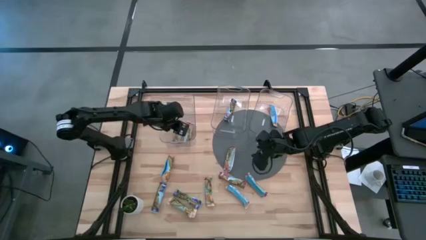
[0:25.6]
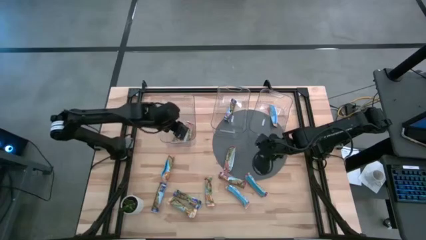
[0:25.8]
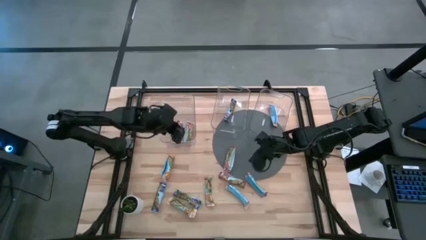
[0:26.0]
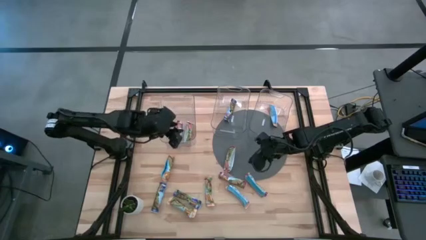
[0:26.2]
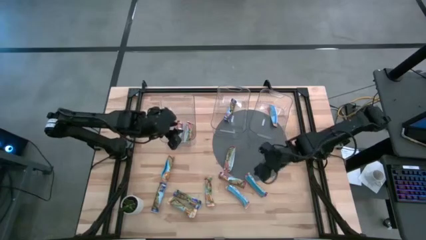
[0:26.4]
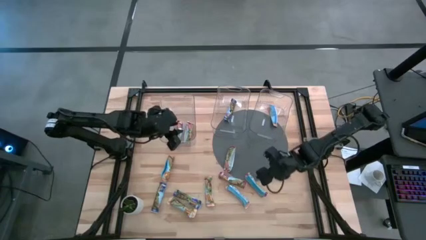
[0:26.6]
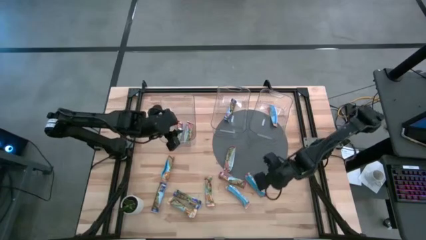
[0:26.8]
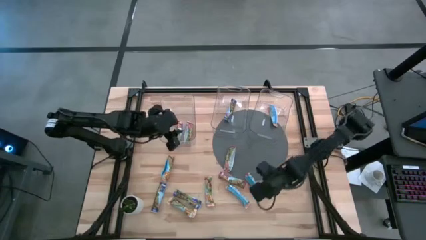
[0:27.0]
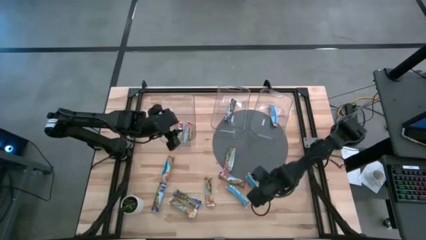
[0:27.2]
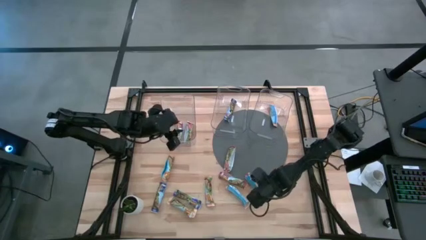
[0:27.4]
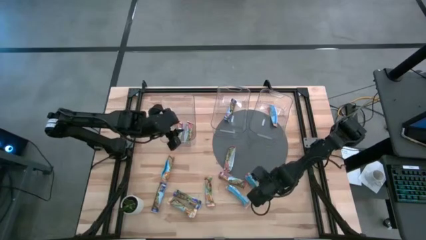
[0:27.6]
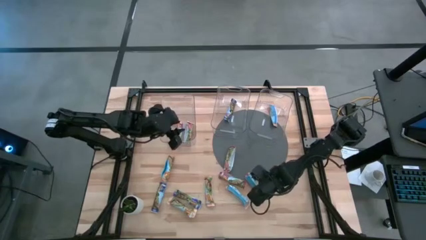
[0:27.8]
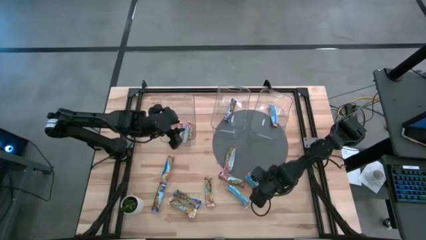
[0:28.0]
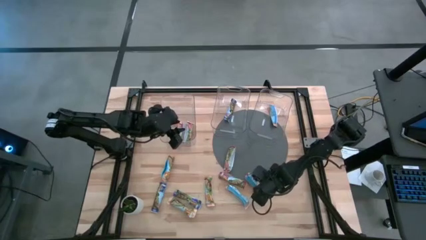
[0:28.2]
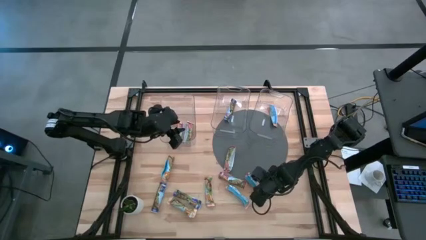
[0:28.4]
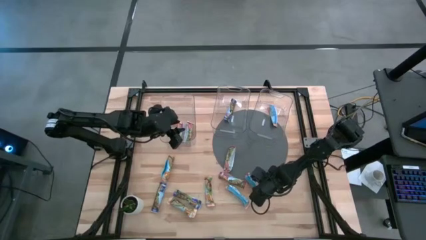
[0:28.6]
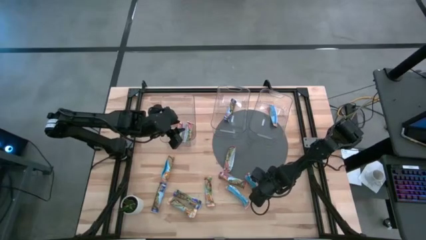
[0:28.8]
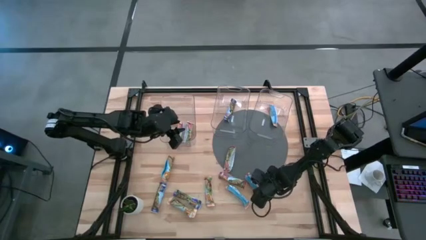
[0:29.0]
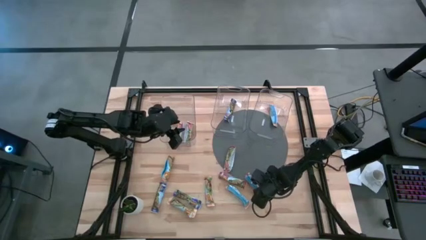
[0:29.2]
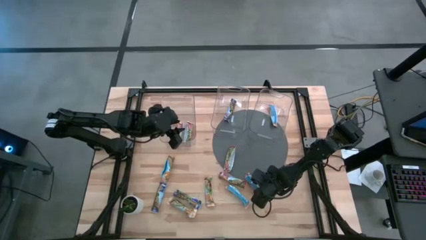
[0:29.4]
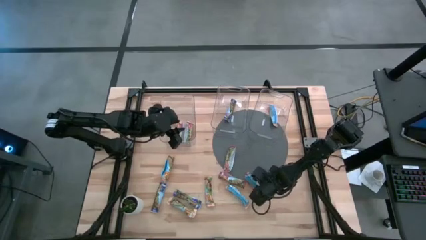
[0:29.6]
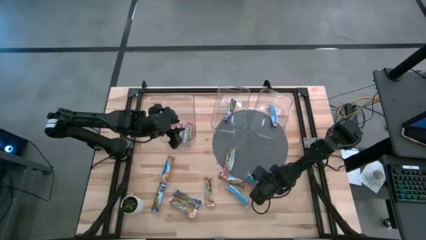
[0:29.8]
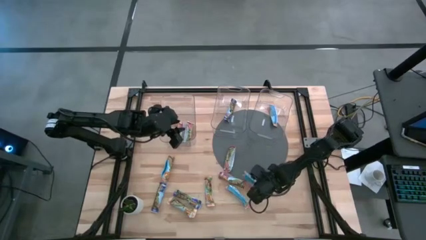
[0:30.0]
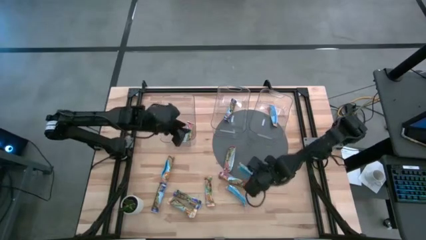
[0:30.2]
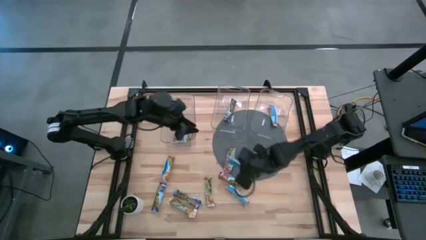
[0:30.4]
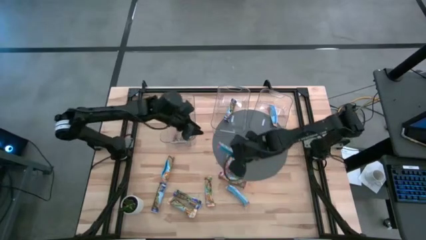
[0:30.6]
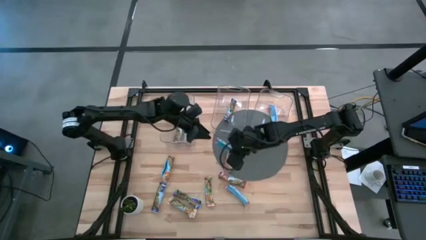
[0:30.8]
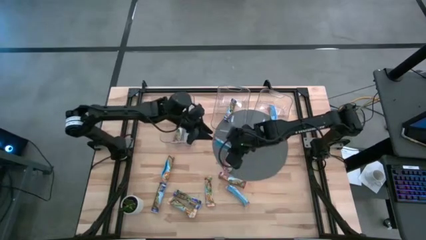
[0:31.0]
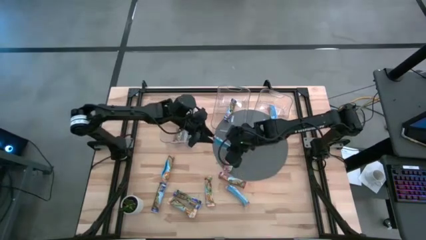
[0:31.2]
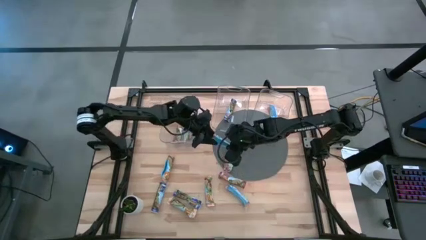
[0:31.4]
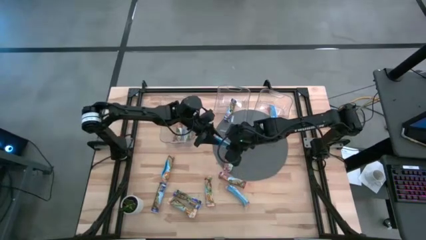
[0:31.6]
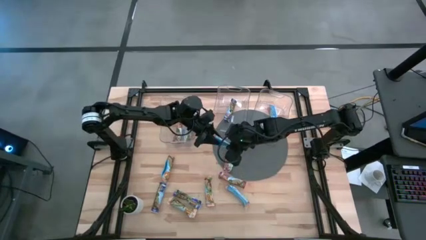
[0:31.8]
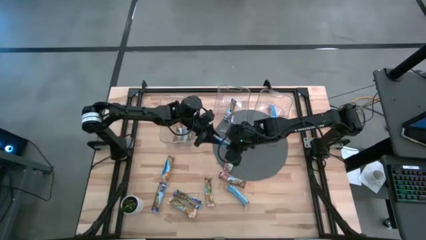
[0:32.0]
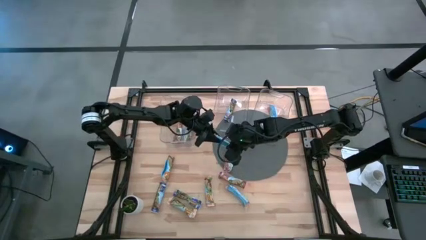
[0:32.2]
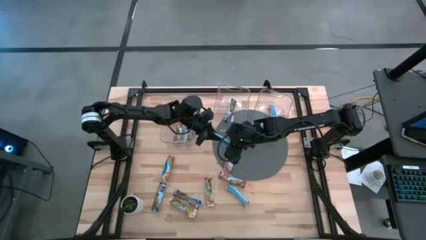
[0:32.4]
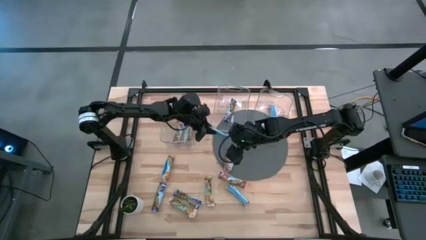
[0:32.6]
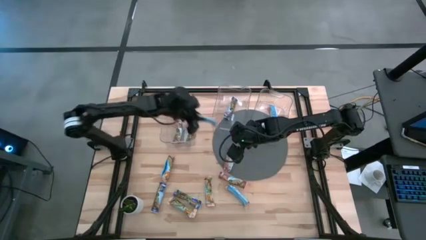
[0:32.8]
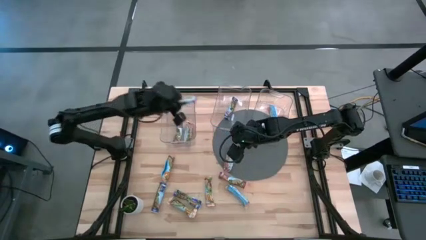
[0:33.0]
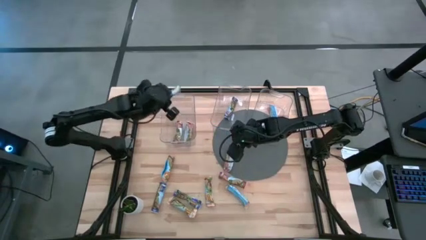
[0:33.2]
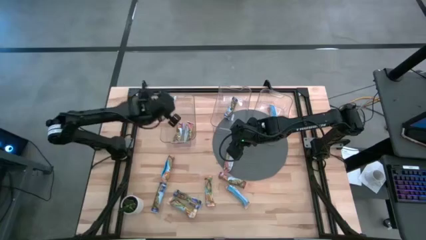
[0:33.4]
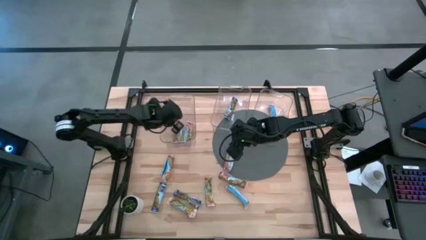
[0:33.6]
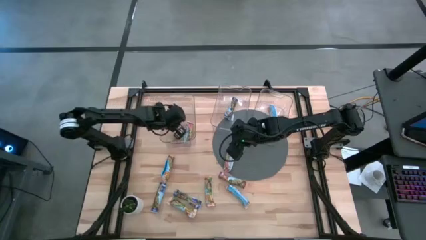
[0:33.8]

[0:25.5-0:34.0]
Task: Pick and place Granola Bars by type
Put the red granola bar into the left transparent bin

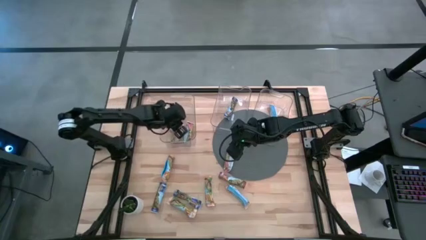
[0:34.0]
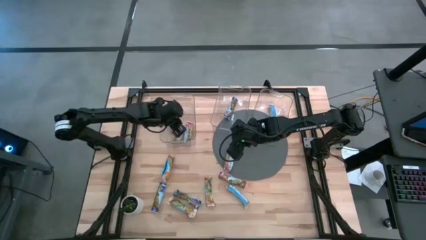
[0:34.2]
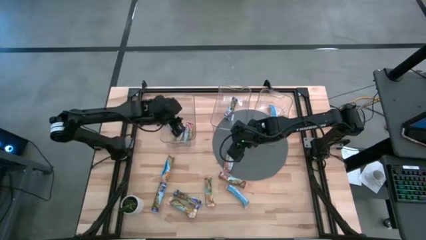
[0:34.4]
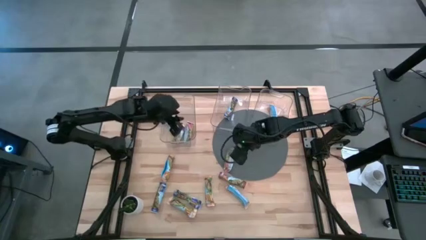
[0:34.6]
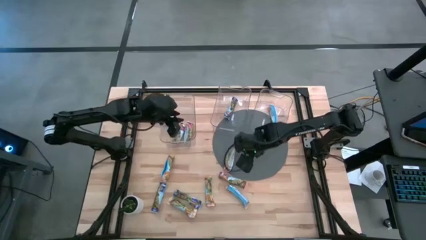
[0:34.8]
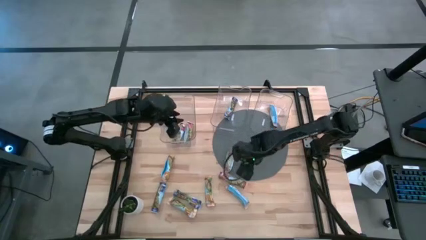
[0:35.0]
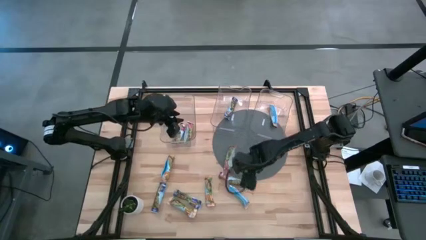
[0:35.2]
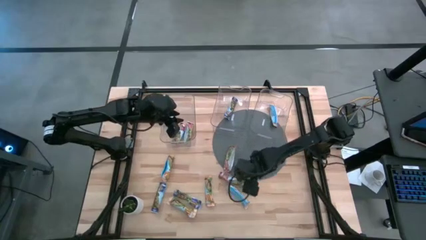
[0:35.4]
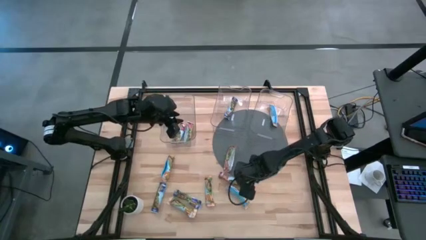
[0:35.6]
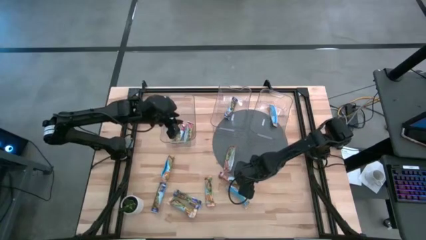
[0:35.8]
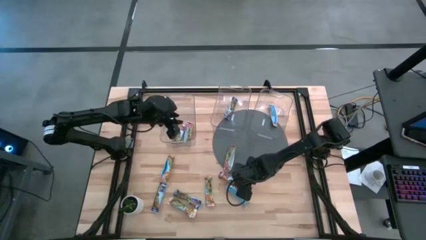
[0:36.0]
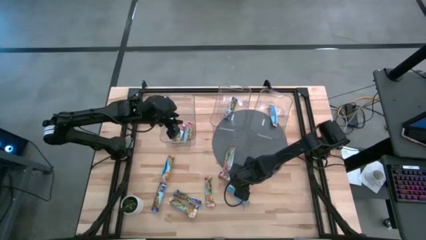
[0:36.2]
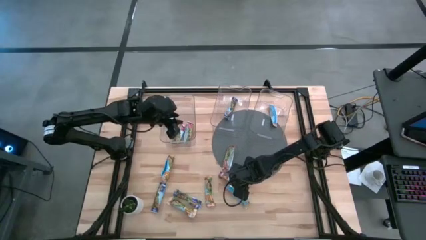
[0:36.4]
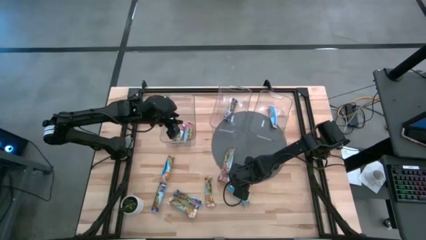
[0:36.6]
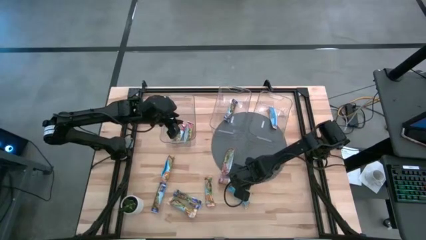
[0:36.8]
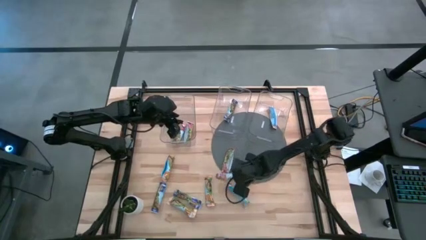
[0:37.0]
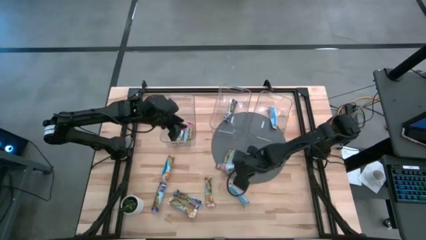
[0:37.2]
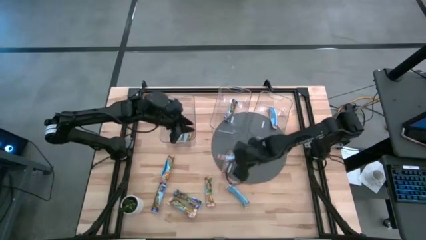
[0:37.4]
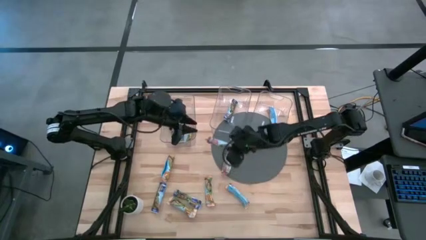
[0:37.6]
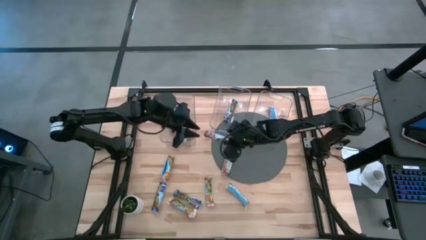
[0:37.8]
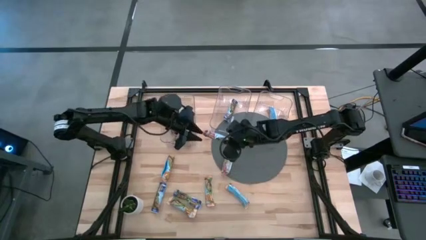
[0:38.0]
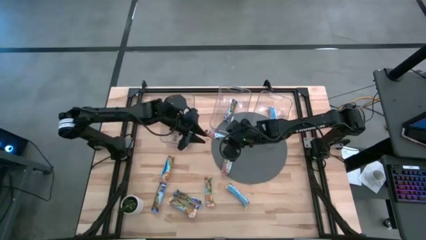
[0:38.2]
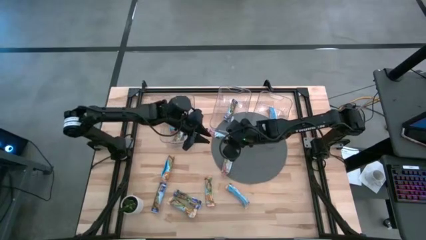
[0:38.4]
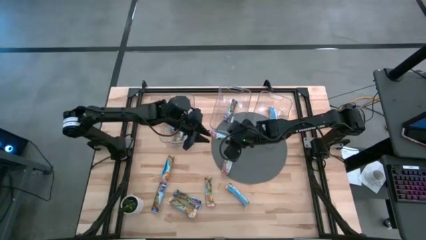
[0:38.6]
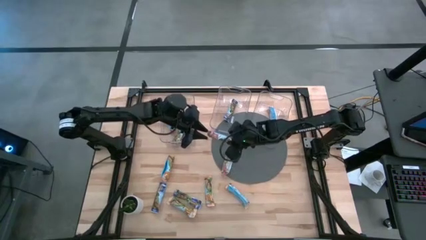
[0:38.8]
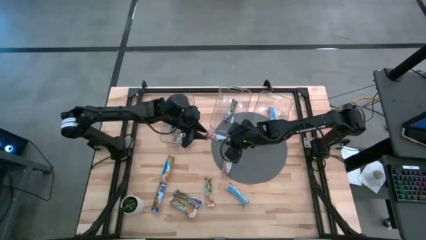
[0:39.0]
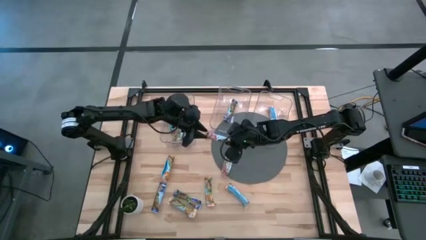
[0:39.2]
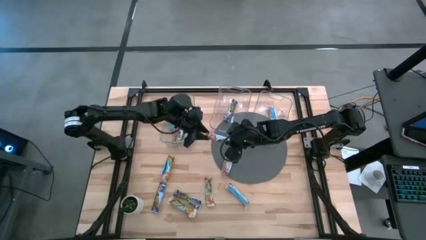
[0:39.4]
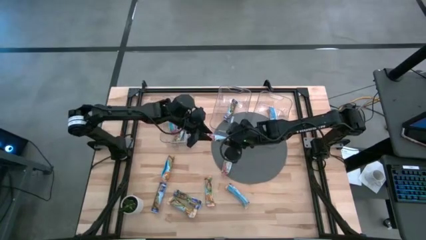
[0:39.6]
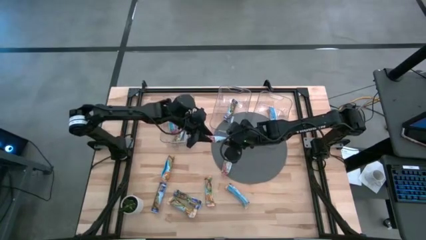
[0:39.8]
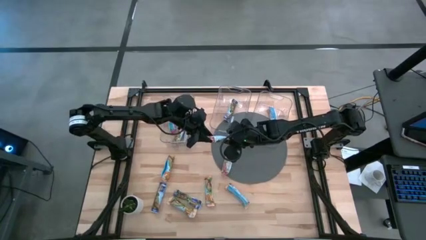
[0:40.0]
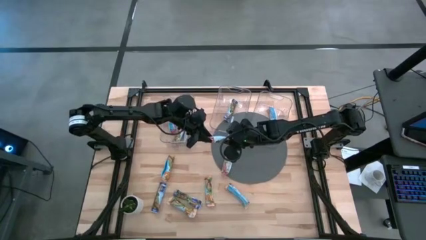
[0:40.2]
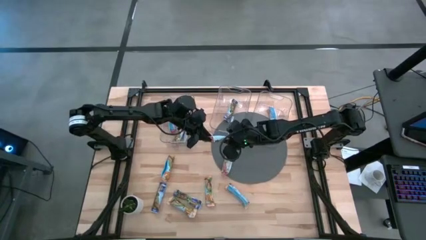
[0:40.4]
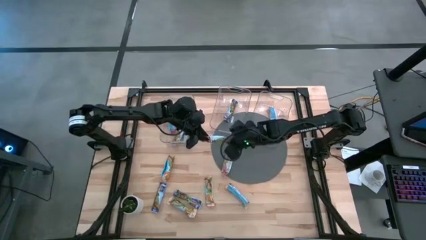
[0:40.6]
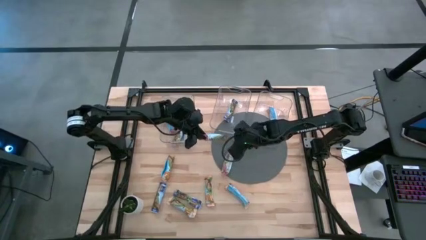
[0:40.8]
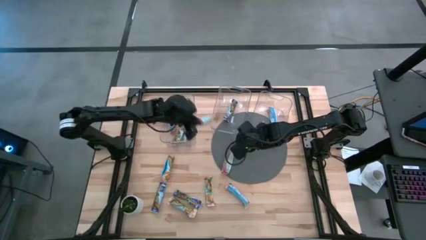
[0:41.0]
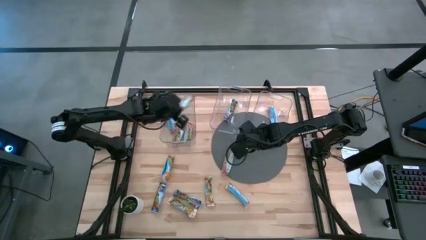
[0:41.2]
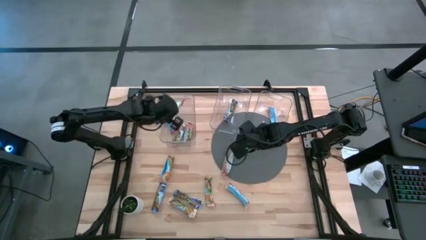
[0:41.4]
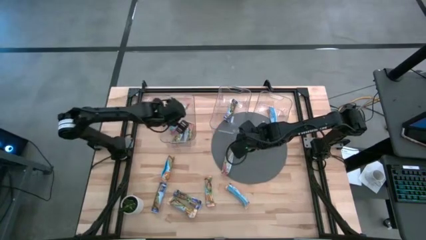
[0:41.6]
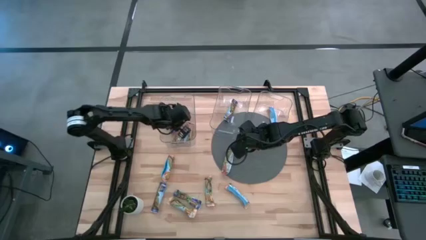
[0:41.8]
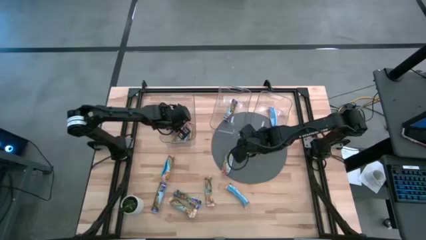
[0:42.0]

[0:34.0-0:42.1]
Put the red granola bar into the left transparent bin
